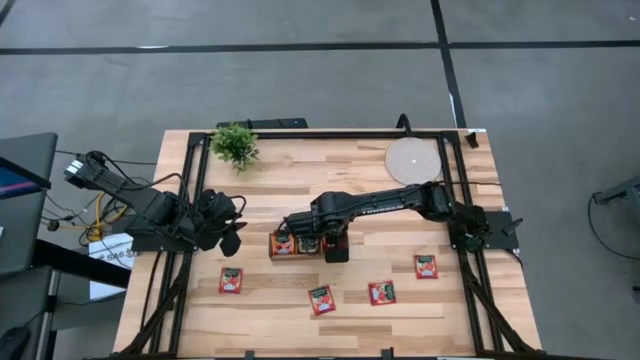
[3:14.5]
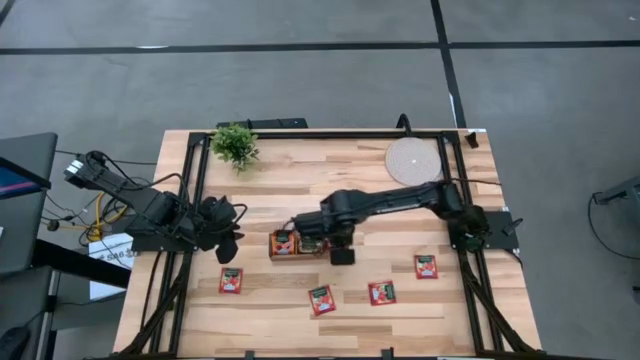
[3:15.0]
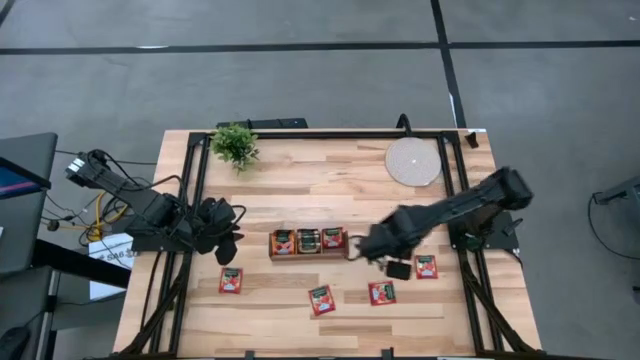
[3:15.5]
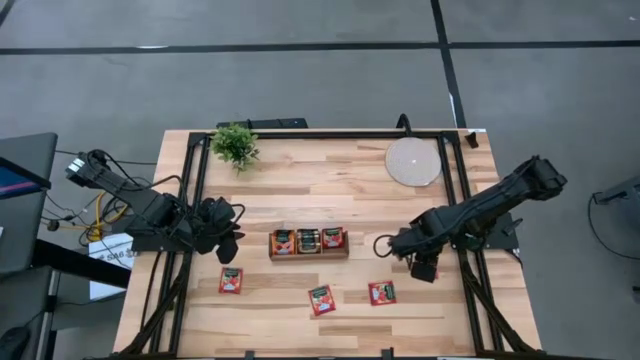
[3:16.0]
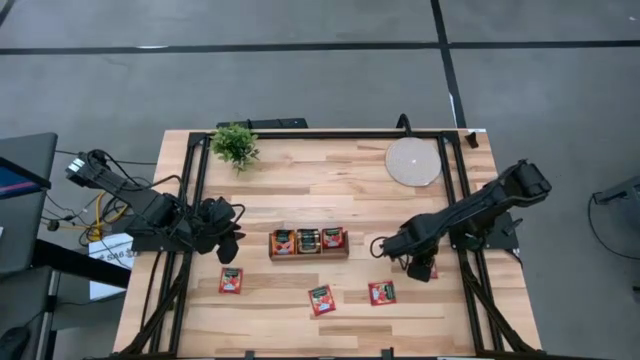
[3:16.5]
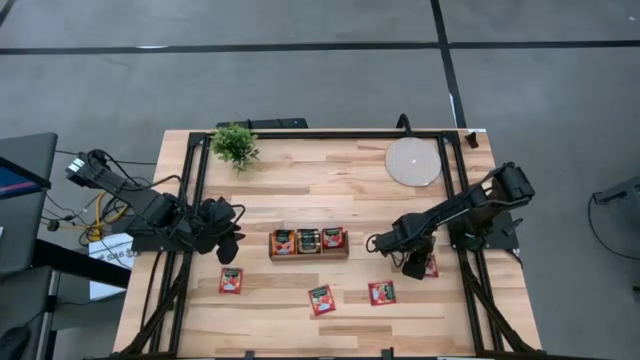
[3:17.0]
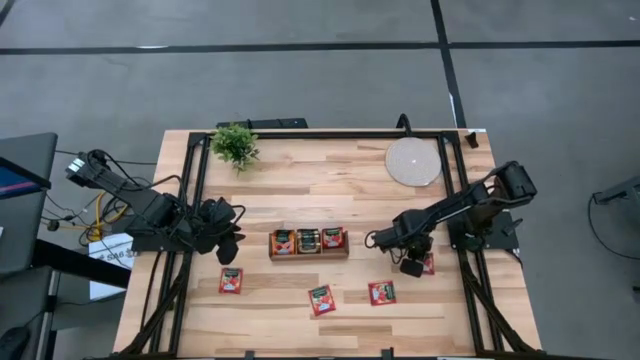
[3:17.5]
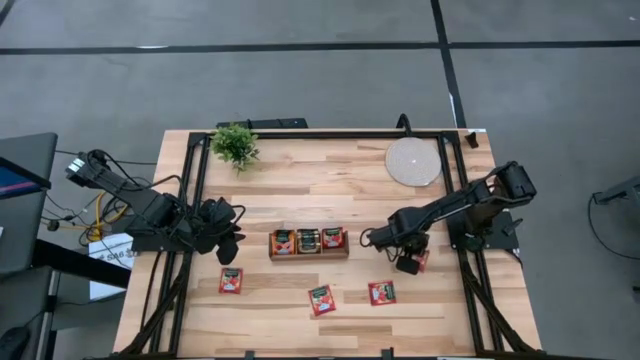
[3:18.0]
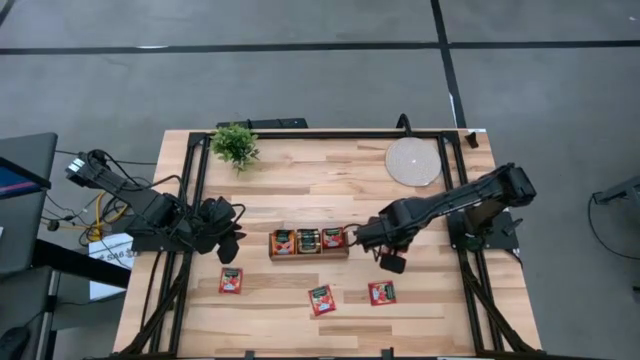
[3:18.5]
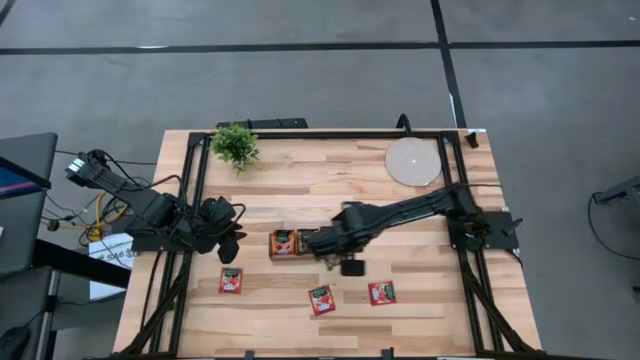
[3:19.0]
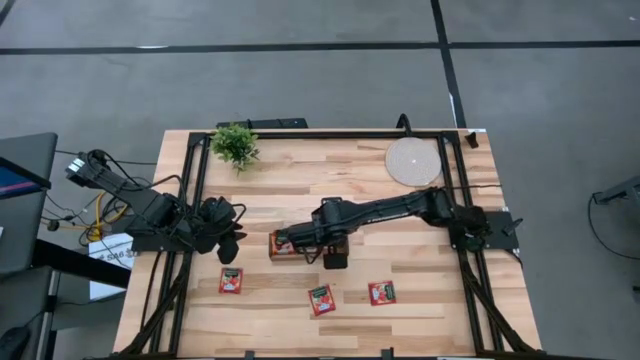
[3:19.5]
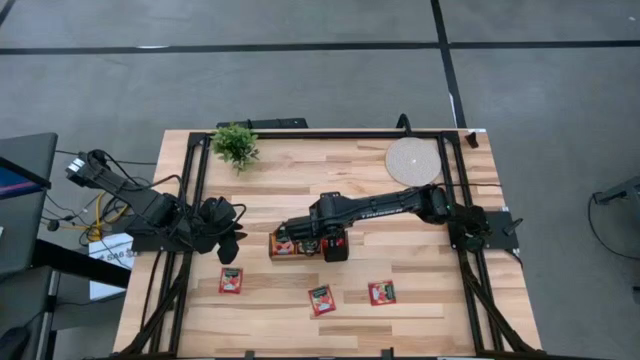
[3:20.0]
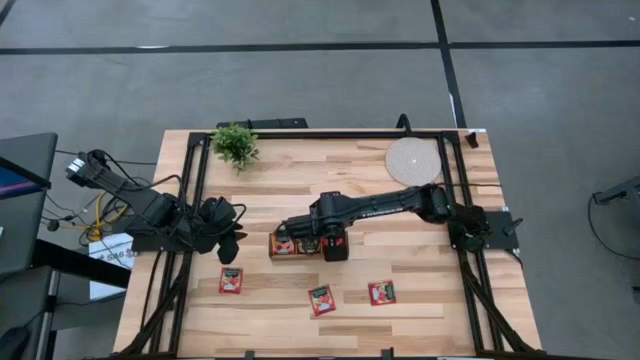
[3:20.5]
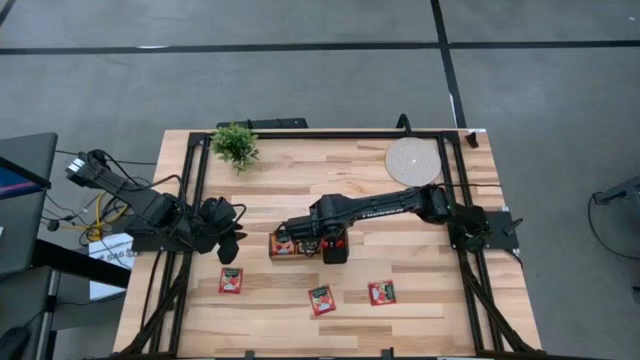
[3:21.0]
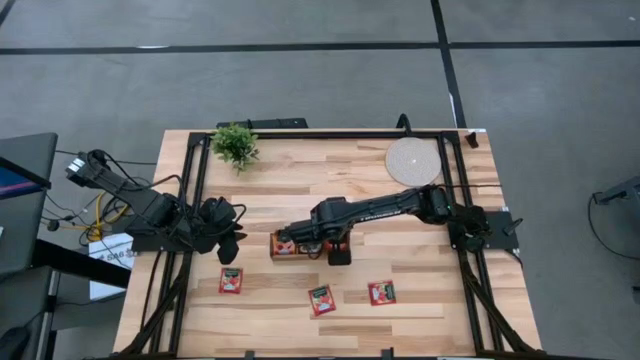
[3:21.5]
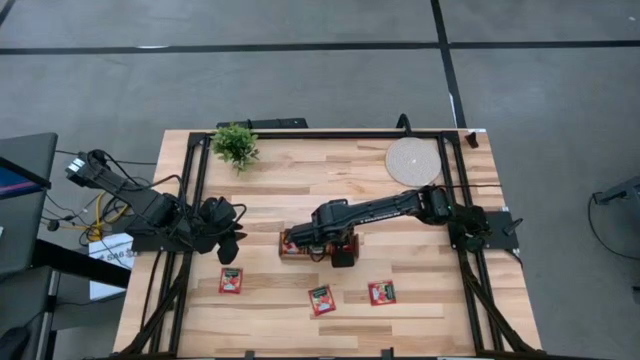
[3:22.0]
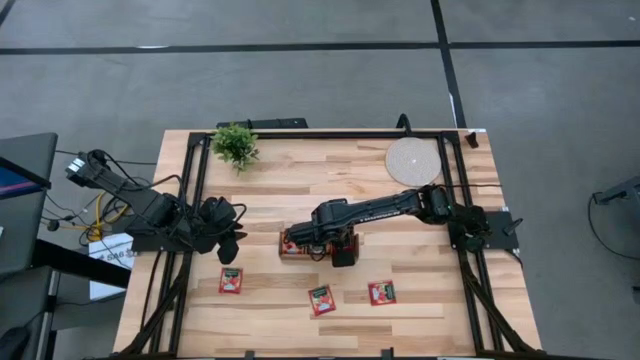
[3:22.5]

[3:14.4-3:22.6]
Task: Pick & Place Tea
Put the red tea bag into the right section of the wooden organizer

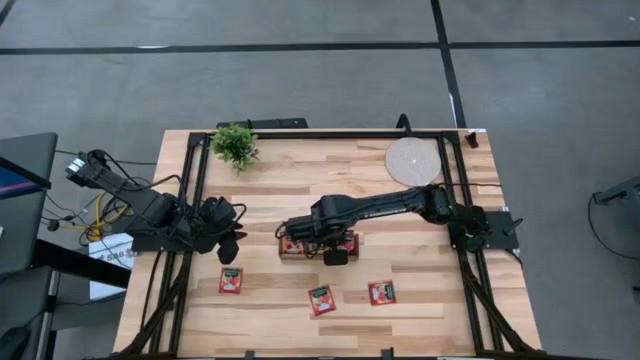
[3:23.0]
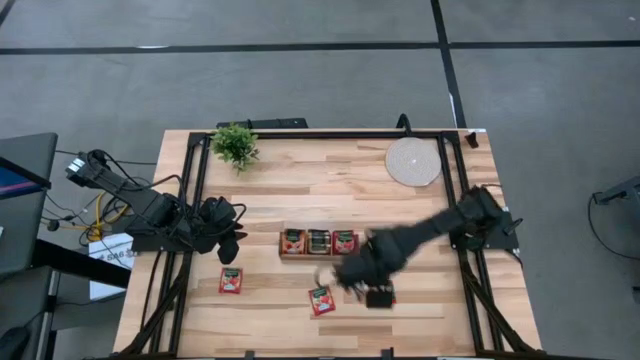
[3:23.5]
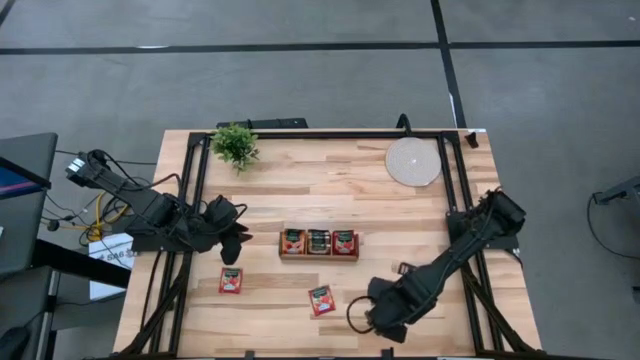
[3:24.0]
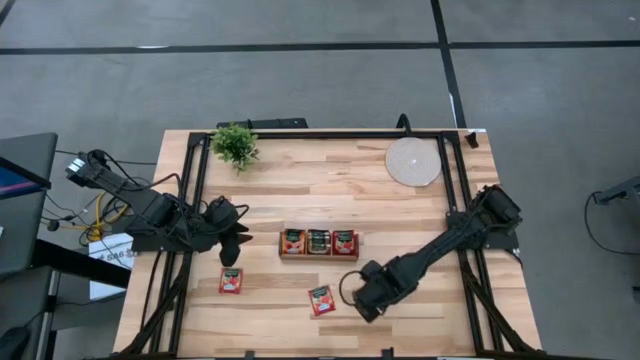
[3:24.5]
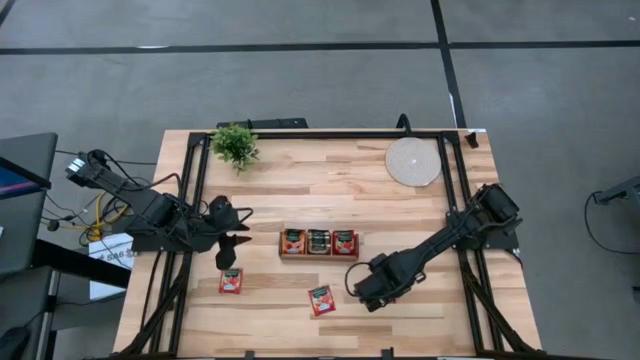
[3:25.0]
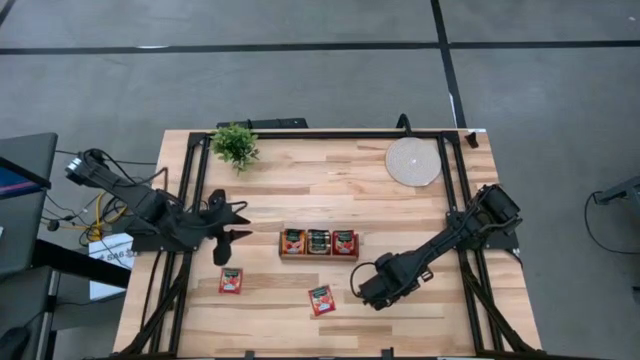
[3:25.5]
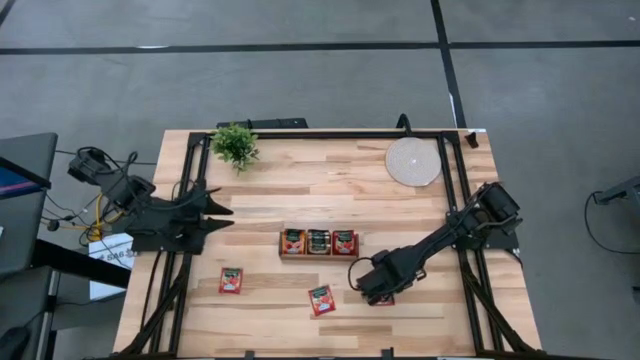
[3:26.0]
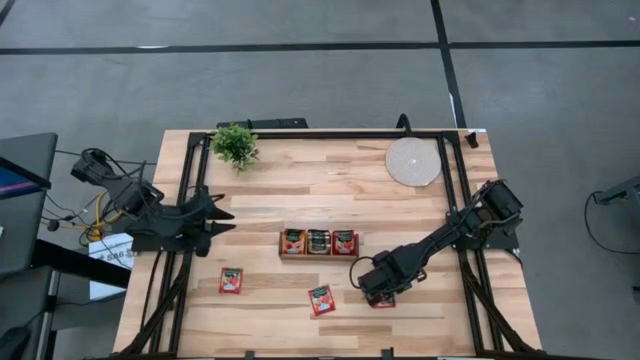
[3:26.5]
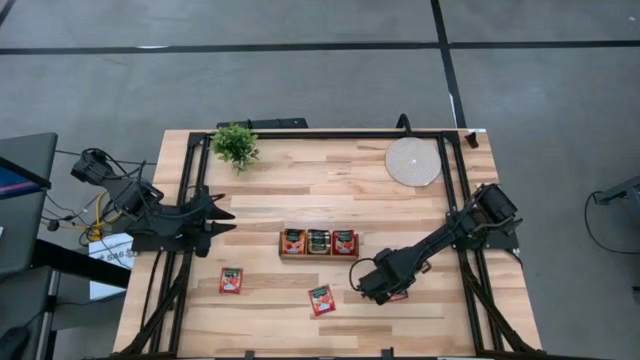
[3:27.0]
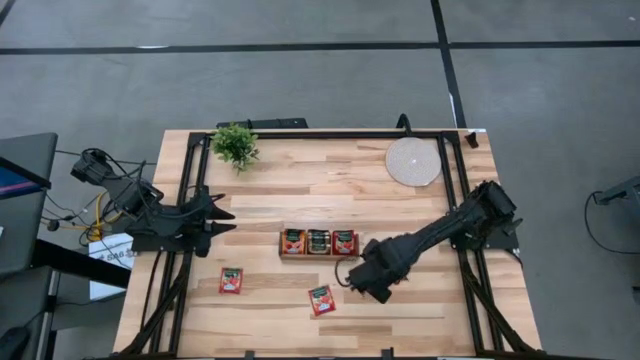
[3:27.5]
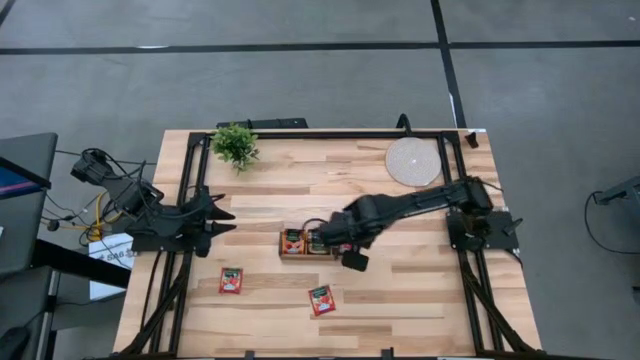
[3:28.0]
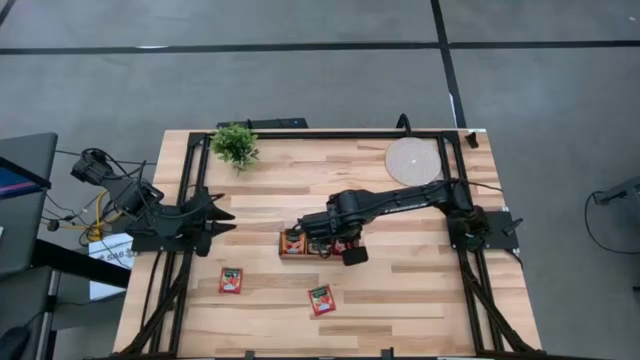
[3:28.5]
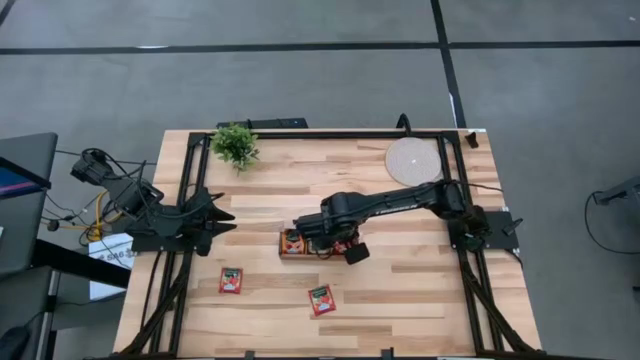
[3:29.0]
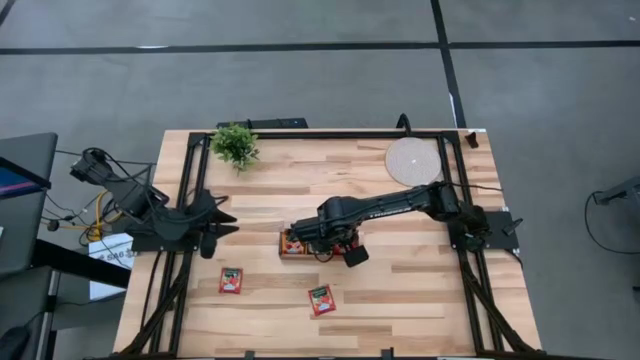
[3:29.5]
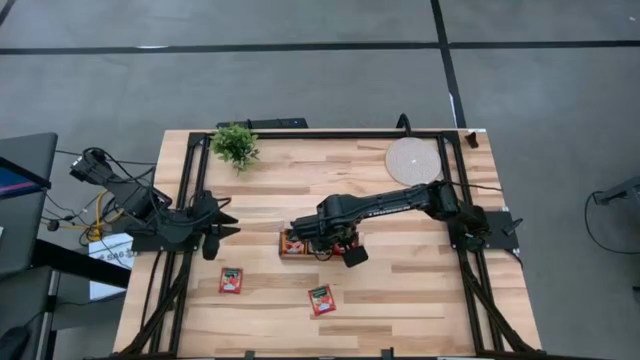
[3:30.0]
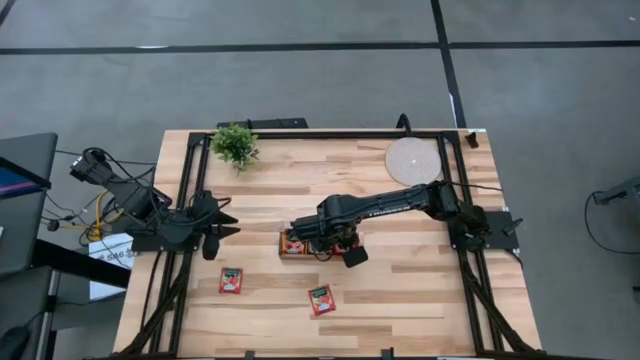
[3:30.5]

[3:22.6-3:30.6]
Put the red tea bag into the right section of the wooden organizer

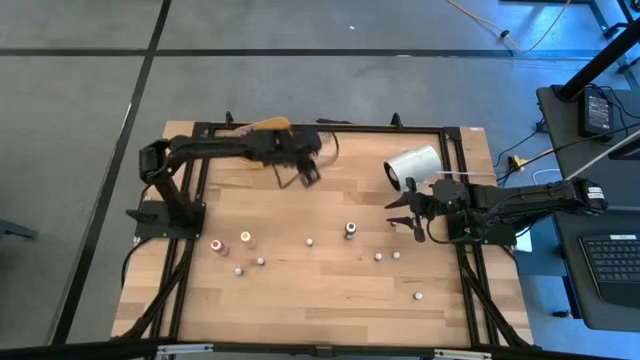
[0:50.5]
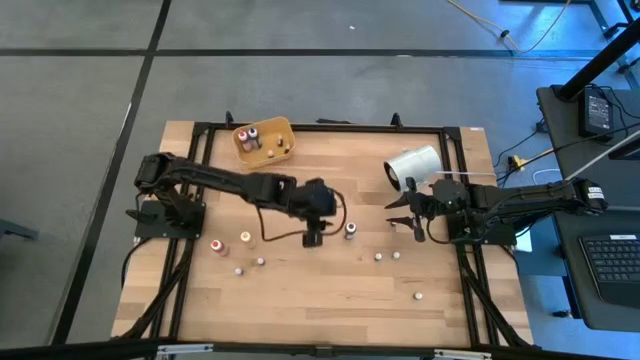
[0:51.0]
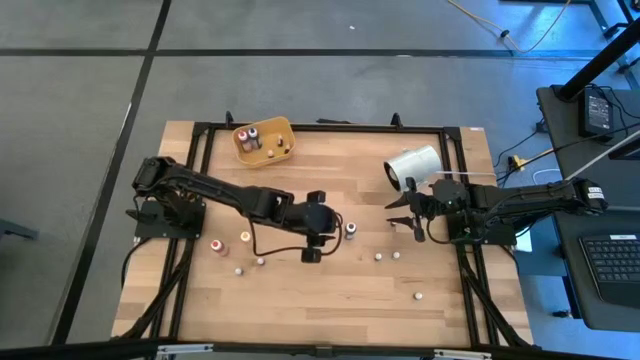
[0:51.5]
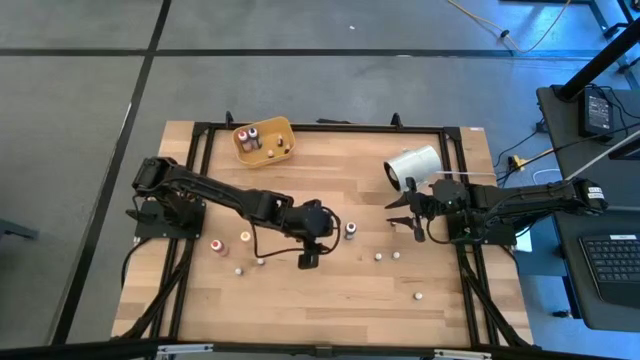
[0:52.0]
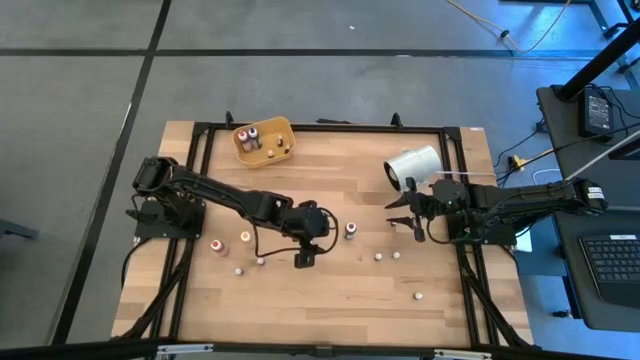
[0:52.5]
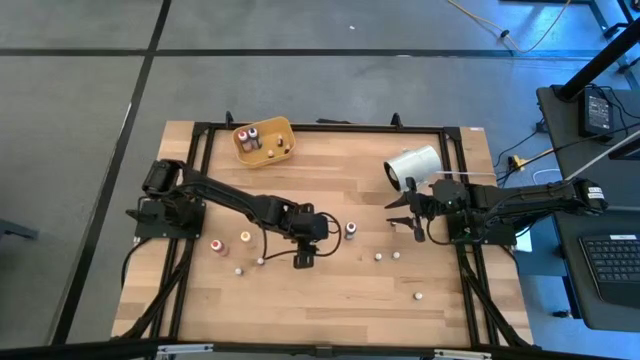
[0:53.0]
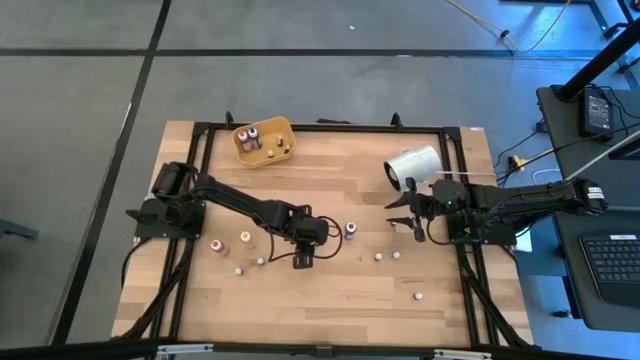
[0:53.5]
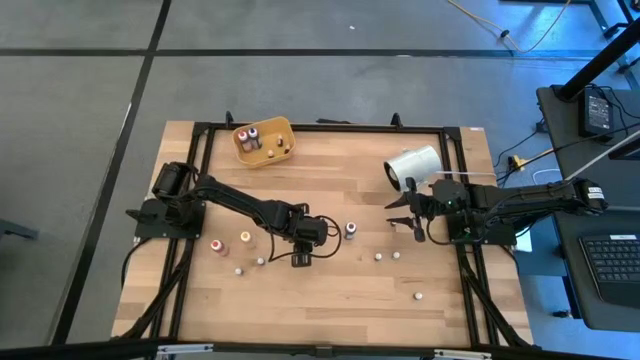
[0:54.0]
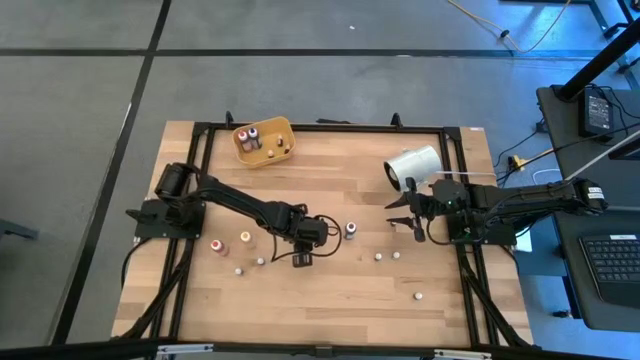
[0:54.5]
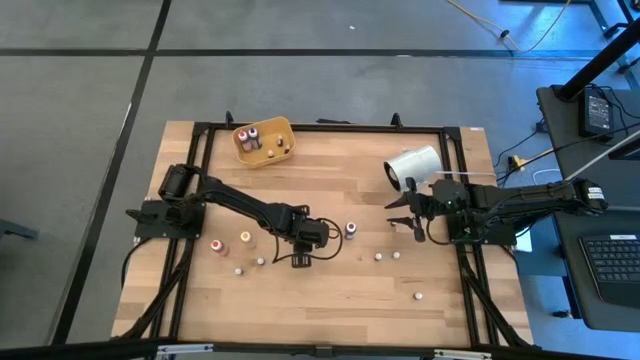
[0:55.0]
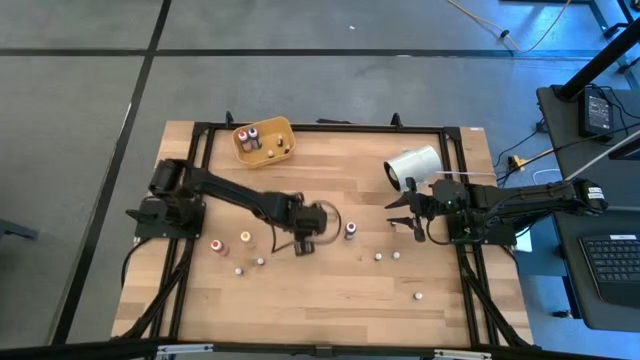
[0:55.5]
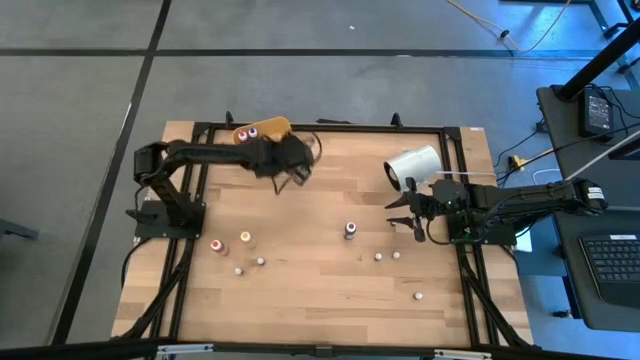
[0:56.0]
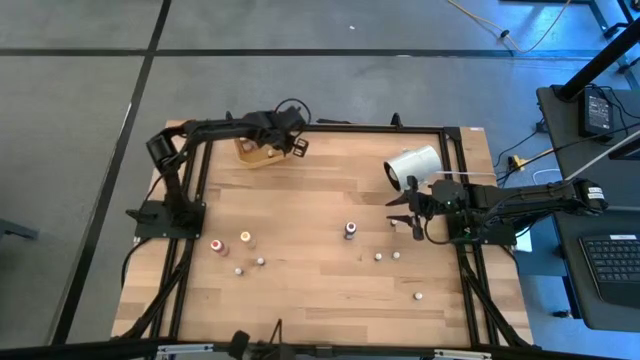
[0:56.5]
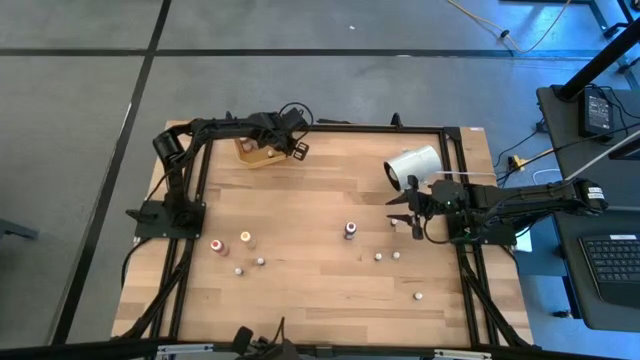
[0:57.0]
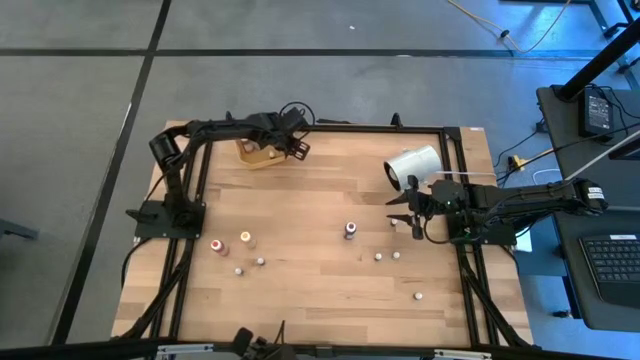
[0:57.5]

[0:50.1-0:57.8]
Task: Pick & Place food coloring
Put the right small blue food coloring bottle into the yellow bin
